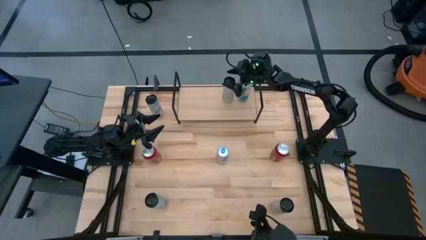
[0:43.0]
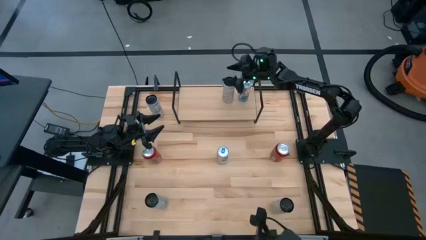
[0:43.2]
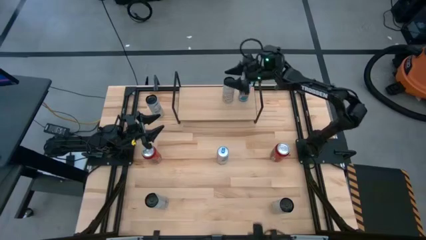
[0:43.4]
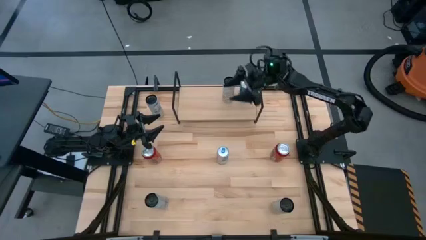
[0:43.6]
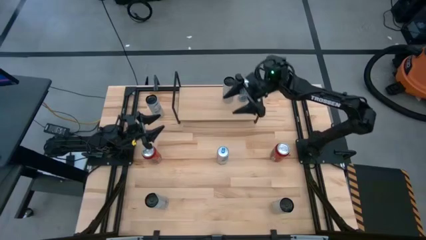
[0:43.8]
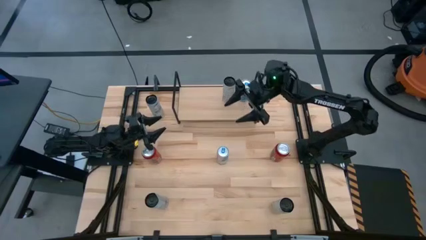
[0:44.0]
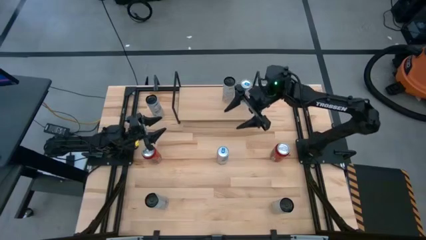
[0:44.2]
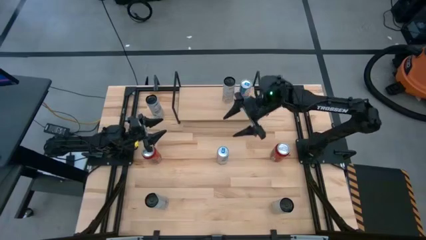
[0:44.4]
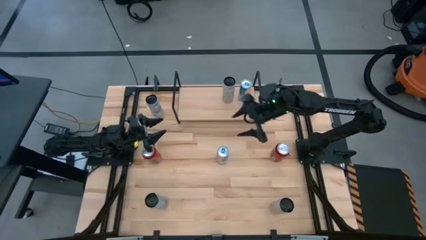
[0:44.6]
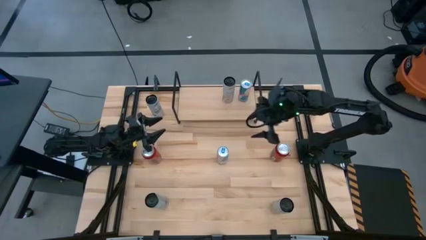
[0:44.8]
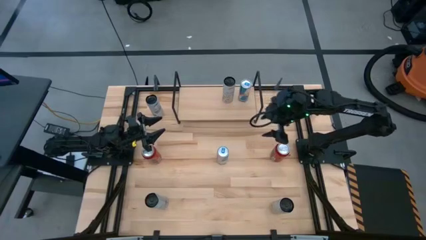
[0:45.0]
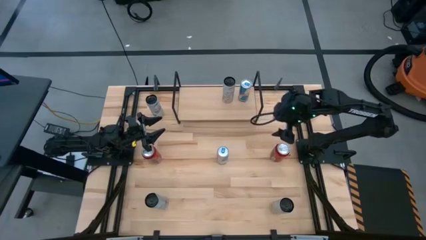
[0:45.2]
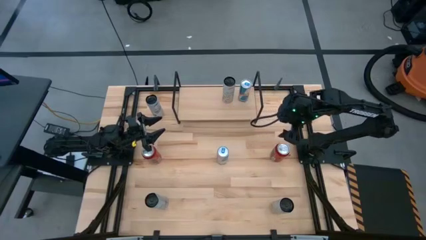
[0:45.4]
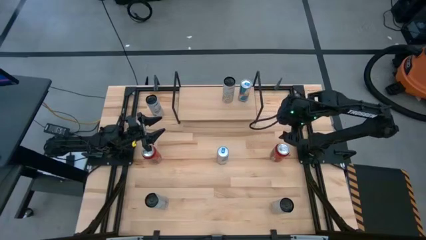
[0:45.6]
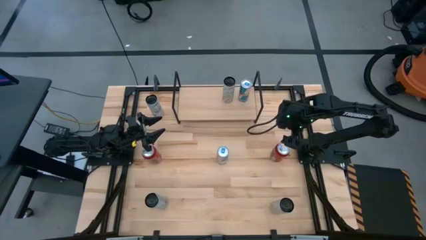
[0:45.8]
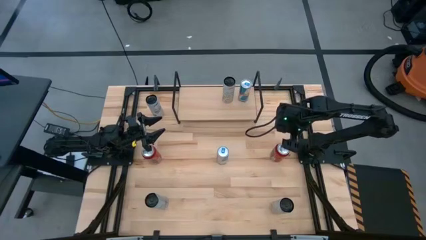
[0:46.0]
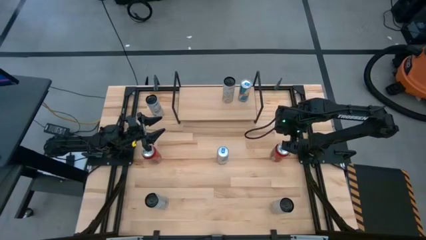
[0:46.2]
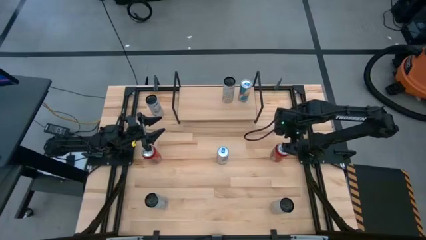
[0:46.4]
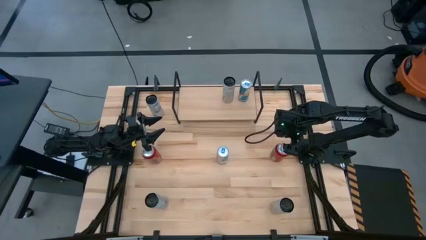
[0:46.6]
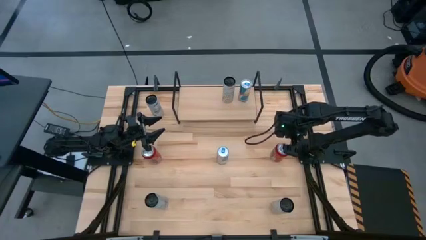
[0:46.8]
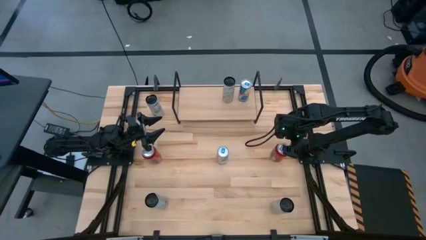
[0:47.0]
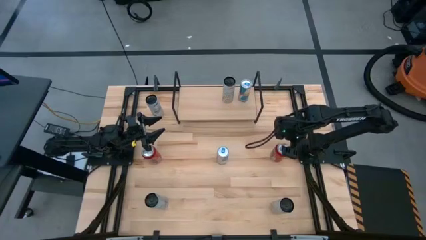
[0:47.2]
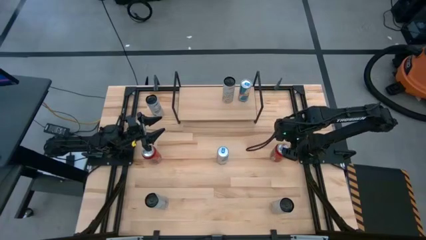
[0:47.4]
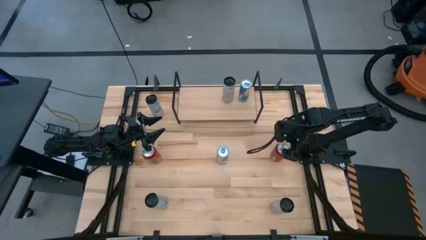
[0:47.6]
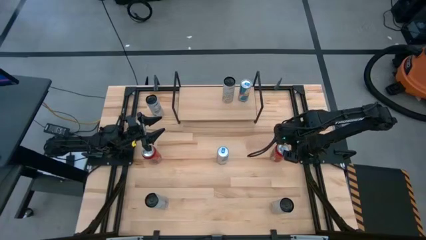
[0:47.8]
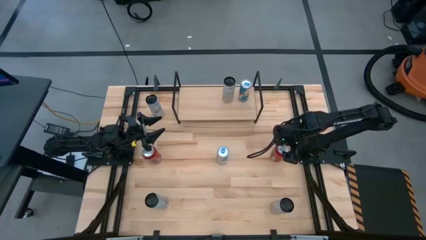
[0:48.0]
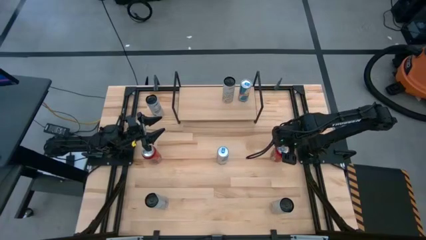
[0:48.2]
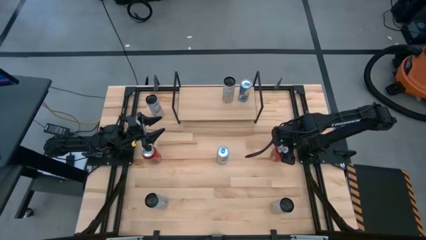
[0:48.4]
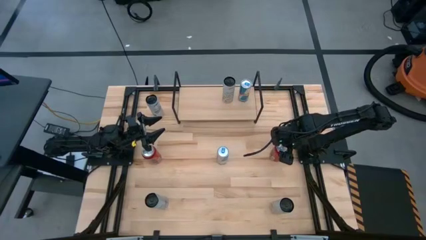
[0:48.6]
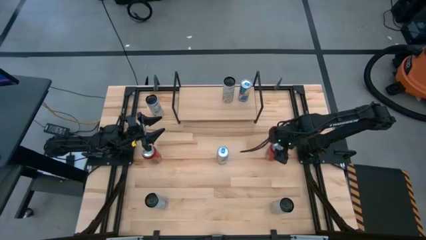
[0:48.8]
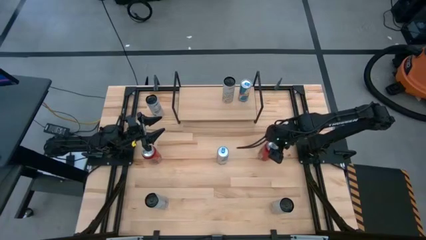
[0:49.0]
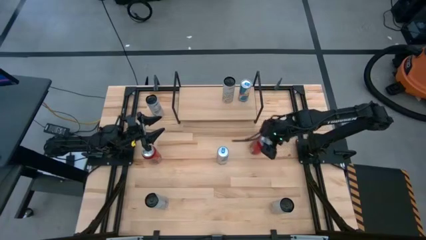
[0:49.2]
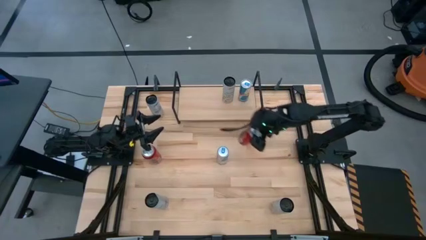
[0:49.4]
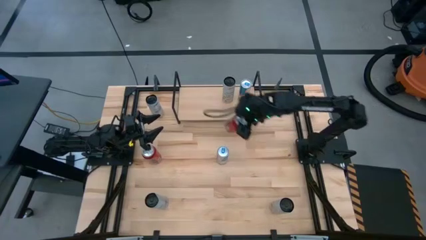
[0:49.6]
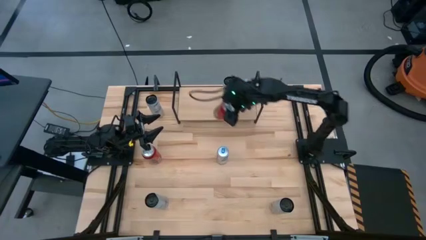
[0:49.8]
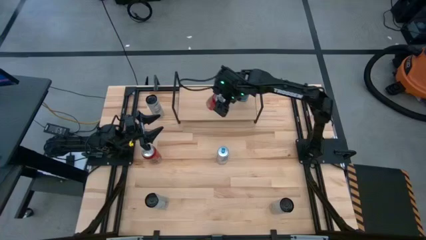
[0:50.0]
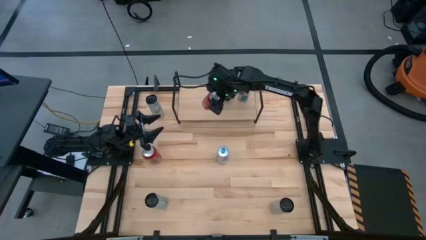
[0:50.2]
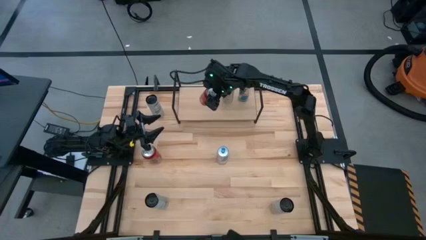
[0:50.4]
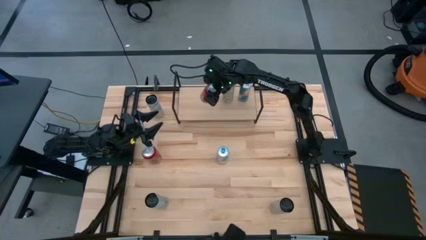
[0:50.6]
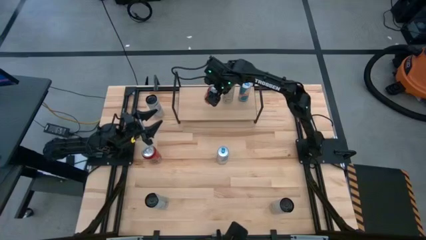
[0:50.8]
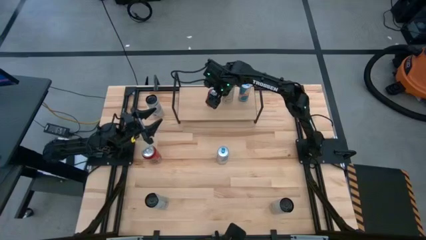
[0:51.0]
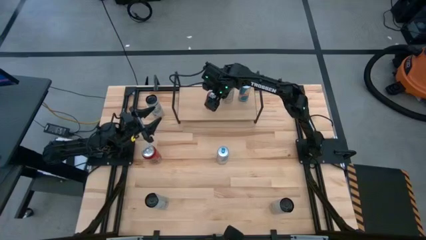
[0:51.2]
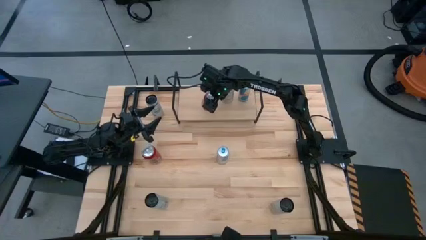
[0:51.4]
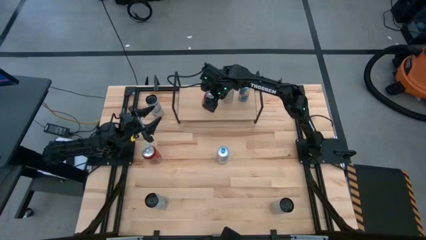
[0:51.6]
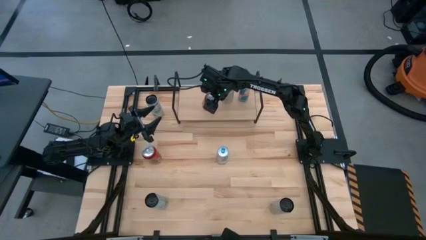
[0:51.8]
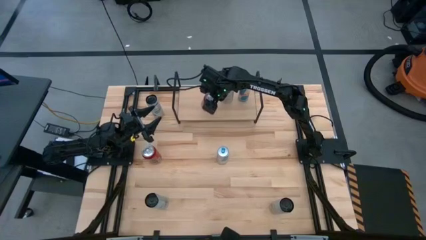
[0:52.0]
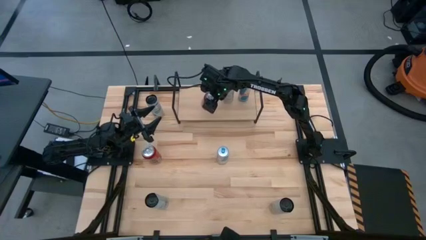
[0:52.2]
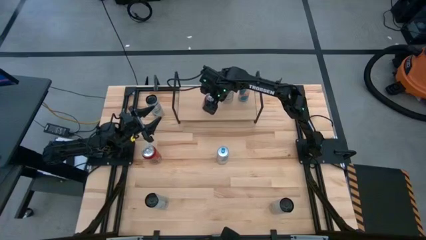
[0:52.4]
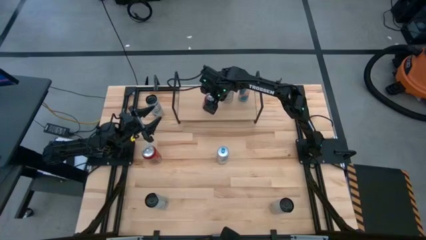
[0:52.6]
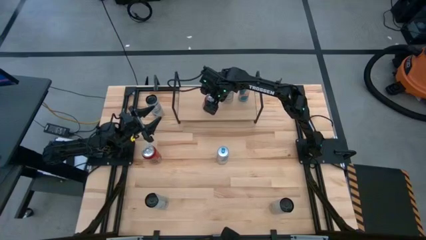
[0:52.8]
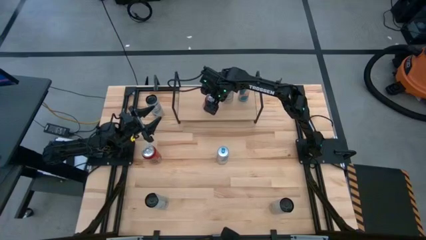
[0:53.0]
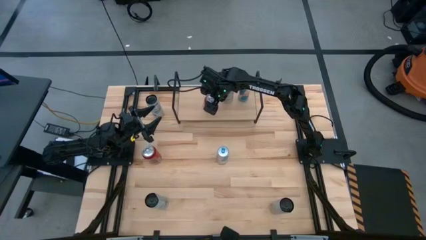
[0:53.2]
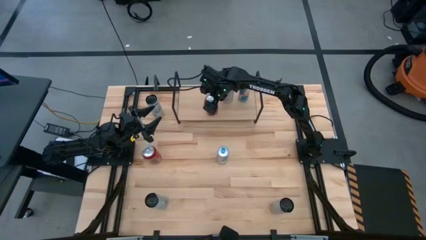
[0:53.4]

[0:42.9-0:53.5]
Task: Place canned beverage on shelf
Put the right red-black soda can on the shelf

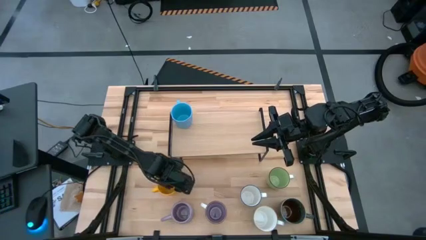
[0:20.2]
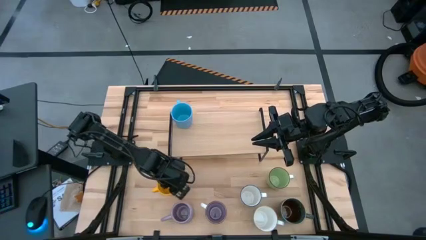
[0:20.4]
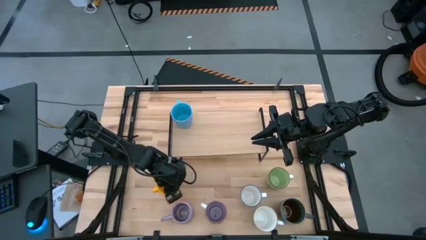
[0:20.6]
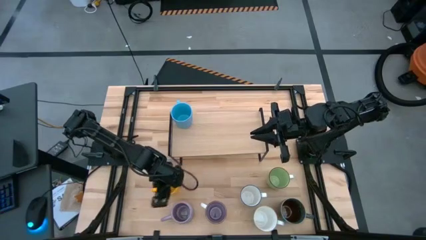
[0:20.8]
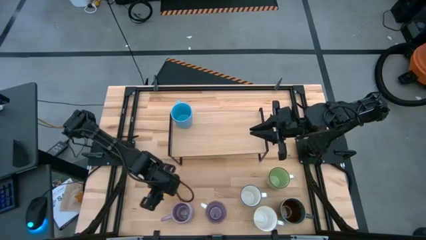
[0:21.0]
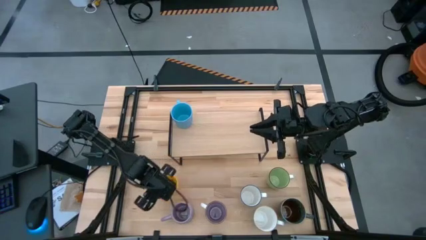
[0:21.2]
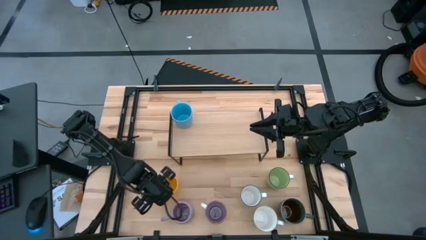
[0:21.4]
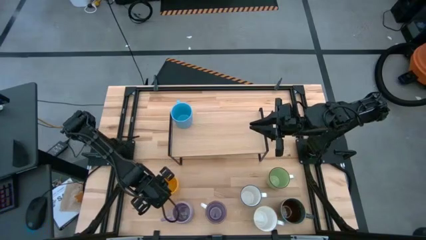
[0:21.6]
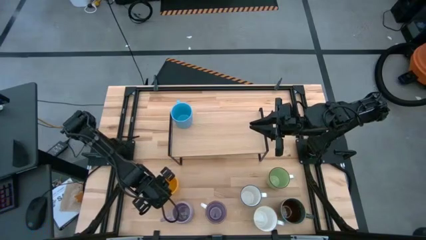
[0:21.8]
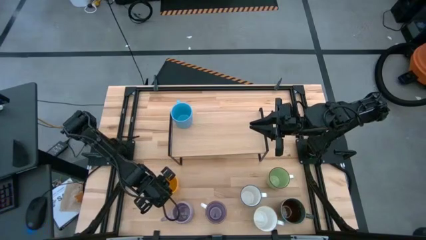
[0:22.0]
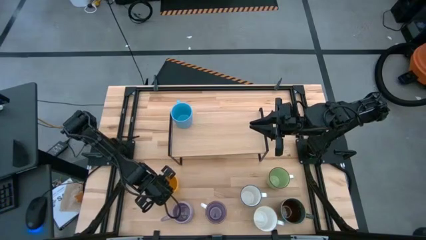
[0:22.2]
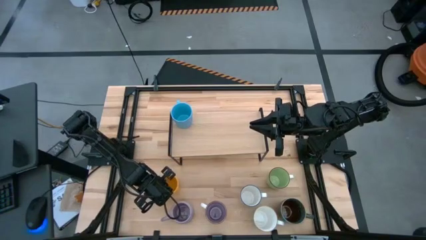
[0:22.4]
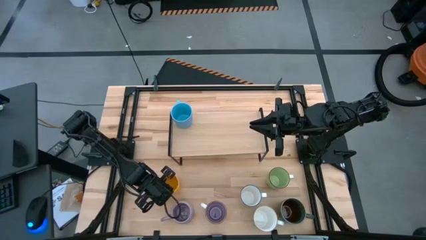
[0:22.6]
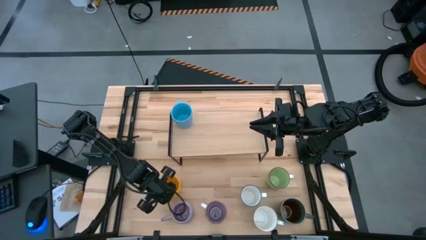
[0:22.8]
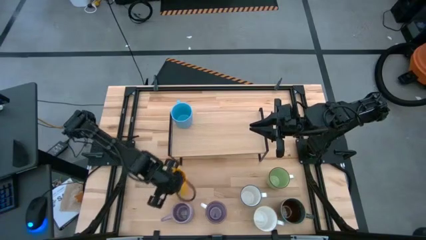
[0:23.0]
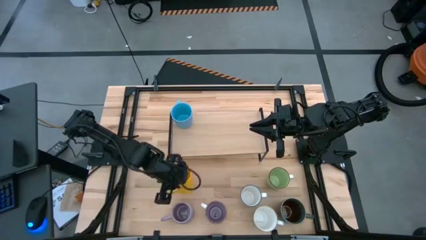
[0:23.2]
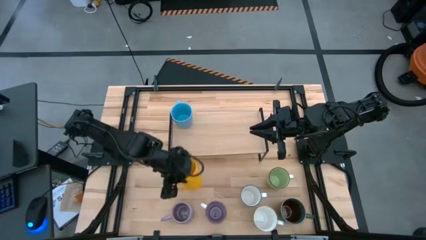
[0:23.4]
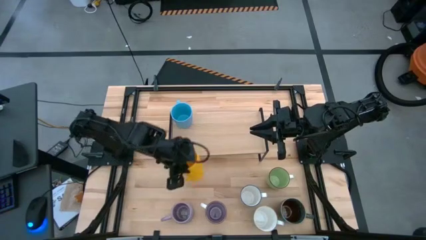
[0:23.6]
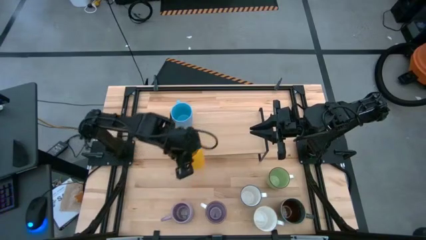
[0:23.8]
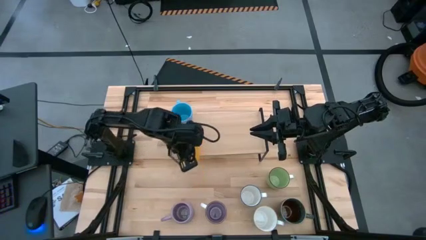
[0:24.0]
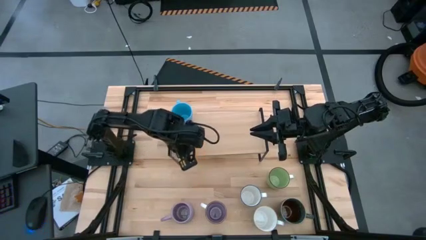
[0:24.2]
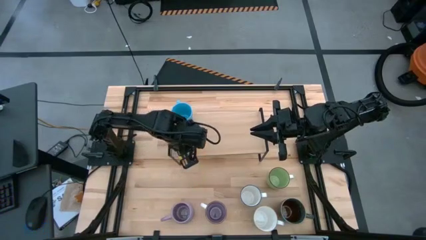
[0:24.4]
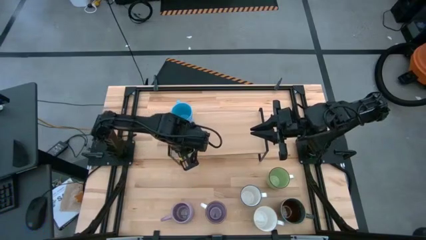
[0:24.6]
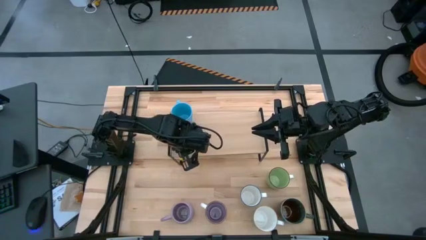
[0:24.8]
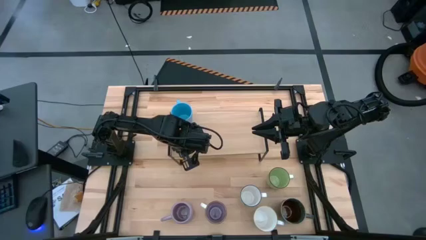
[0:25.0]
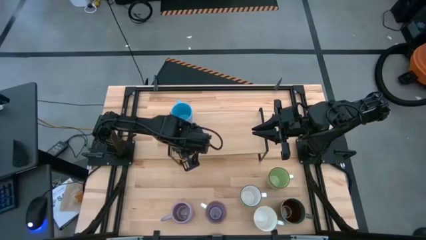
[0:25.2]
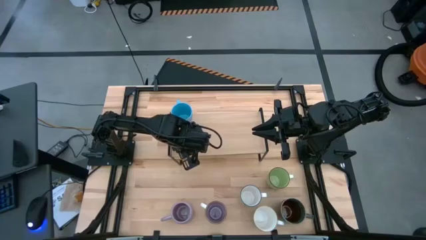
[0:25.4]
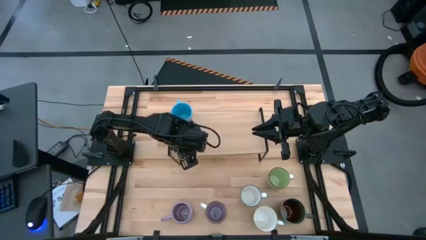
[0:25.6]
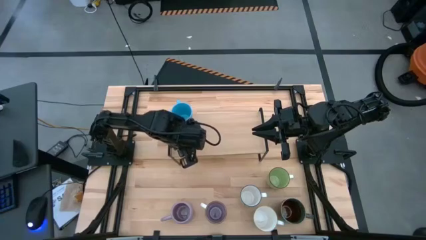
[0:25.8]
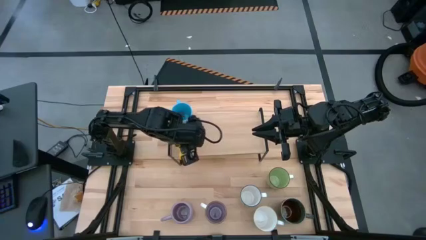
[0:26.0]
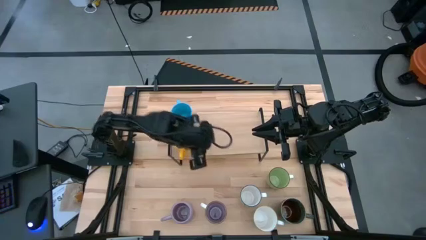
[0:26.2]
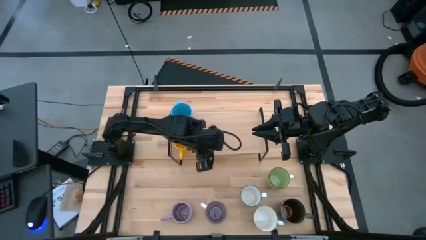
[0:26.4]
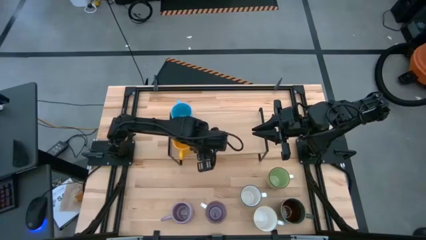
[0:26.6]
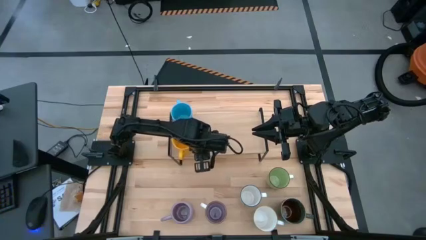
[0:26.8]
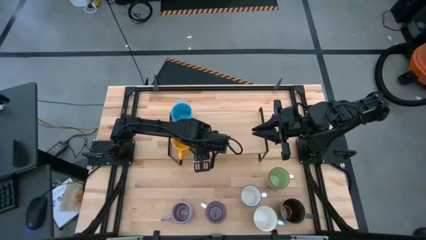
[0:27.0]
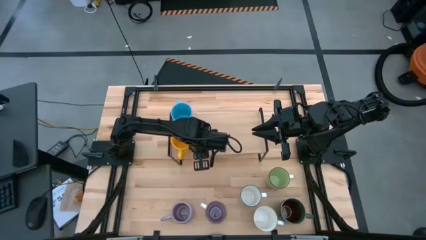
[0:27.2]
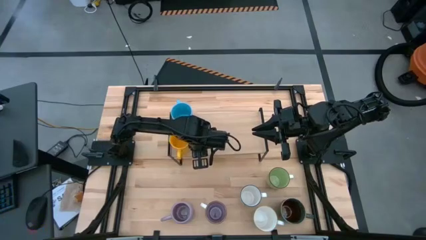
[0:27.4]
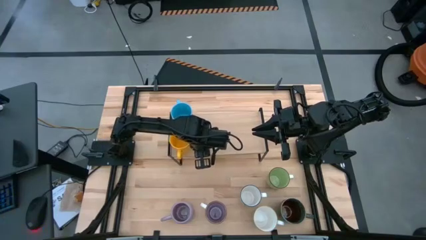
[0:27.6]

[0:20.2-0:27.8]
Task: Place coffee mugs
Put the yellow mug on the shelf
